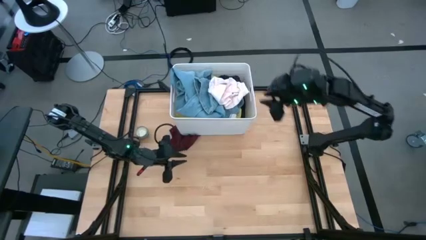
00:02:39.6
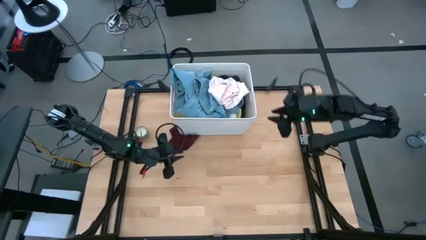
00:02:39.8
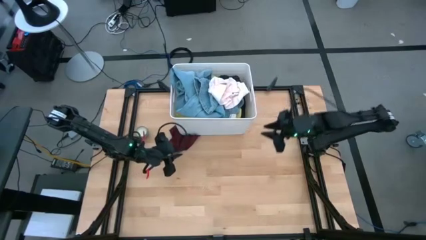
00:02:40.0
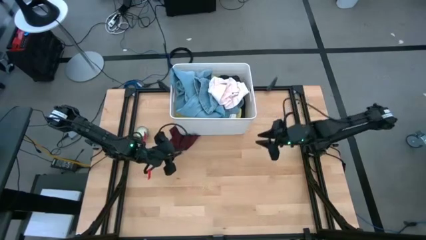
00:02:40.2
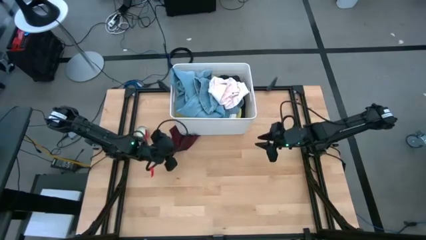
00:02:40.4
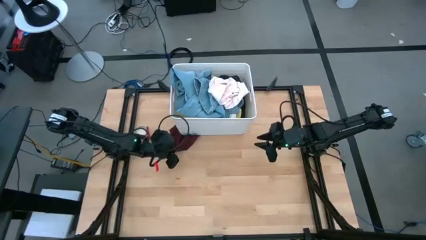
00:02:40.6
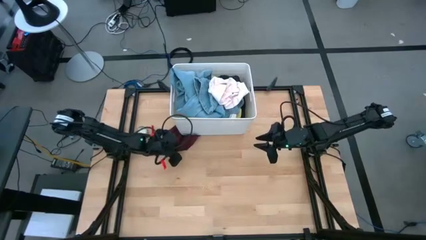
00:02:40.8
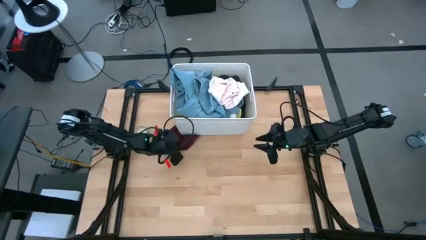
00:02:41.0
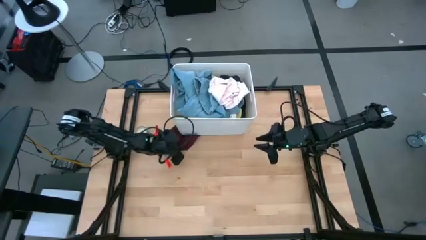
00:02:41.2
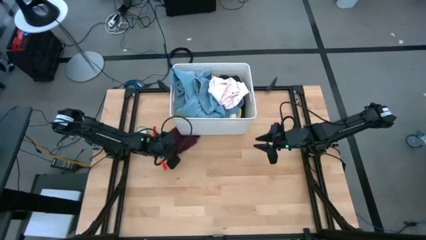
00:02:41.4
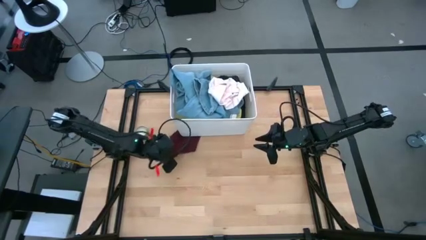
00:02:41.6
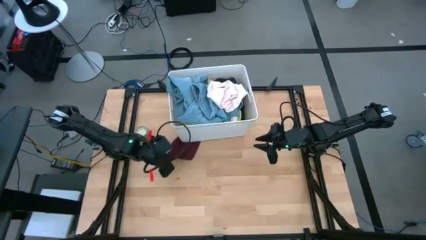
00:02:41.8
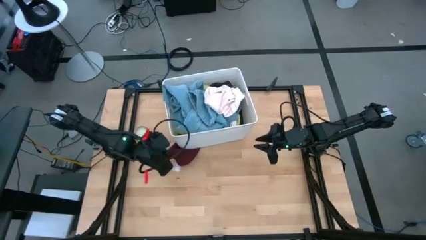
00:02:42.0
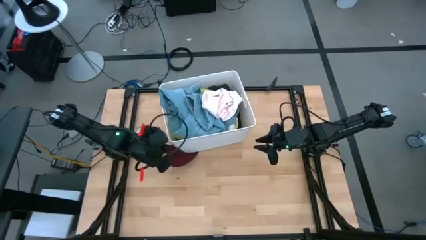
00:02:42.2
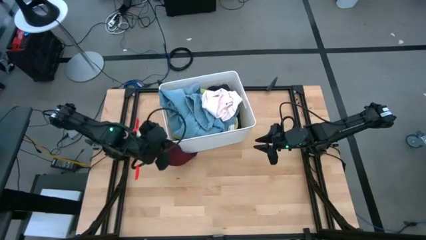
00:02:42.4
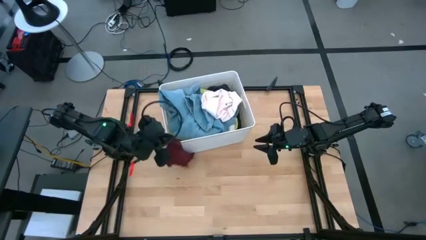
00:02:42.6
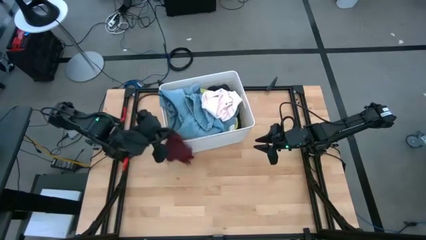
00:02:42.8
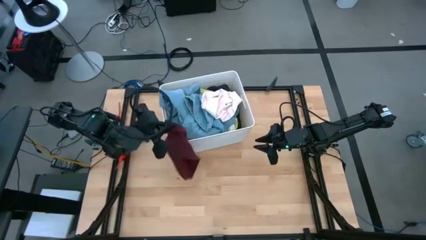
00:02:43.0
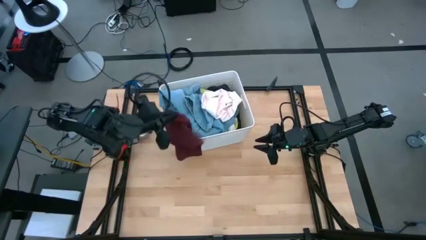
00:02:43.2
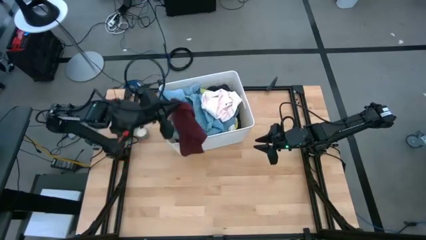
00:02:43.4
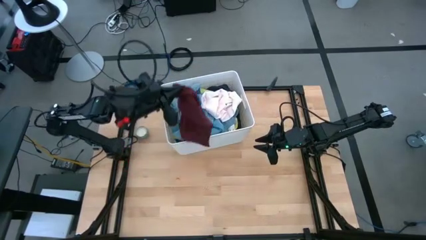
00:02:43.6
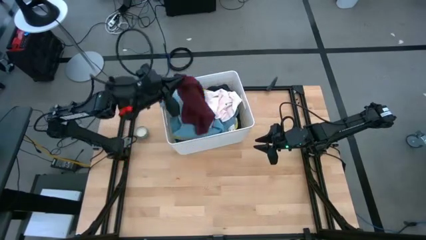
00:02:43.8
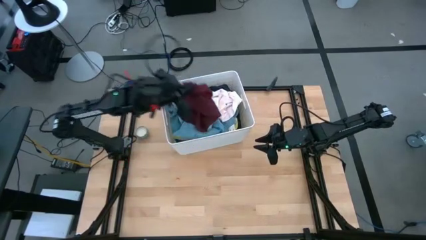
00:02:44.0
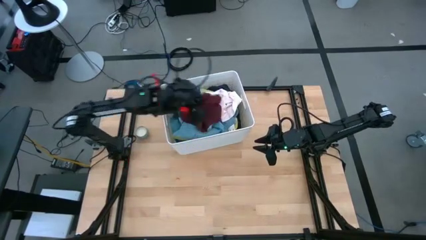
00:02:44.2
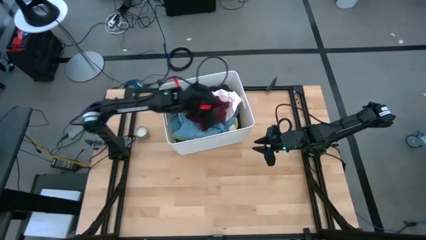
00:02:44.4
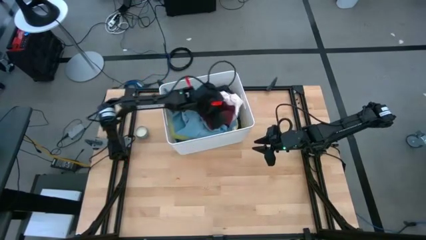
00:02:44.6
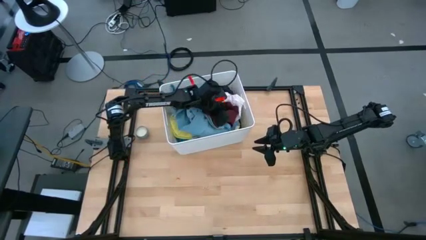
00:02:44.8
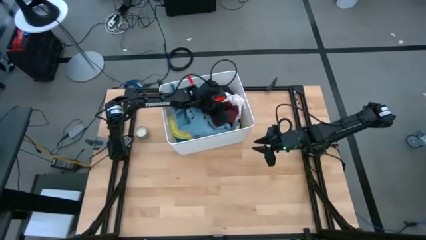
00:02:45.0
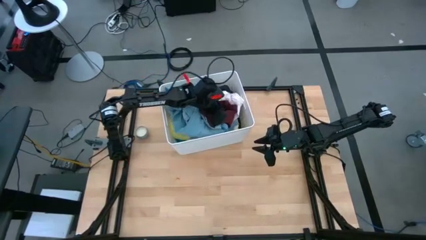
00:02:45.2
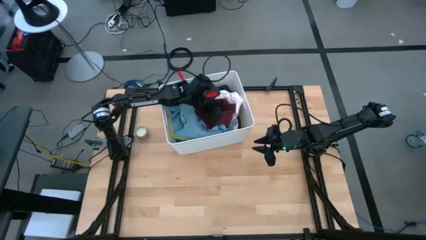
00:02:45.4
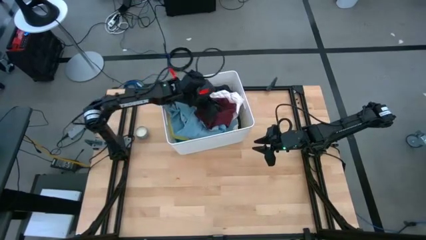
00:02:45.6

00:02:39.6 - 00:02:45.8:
Task: Sort clothes
Put the red underwear into the white laundry bin

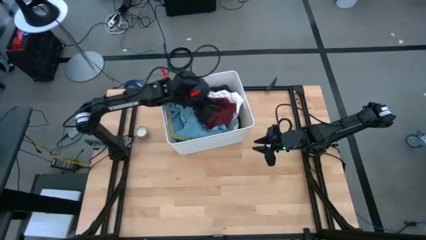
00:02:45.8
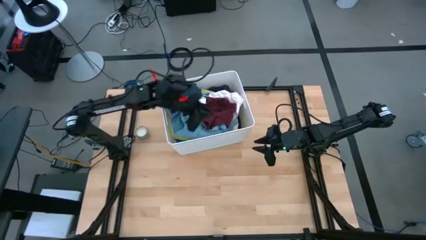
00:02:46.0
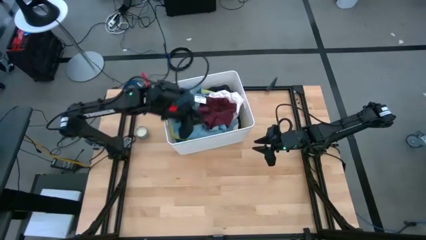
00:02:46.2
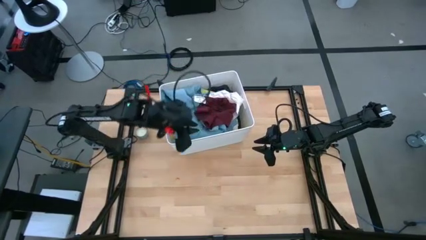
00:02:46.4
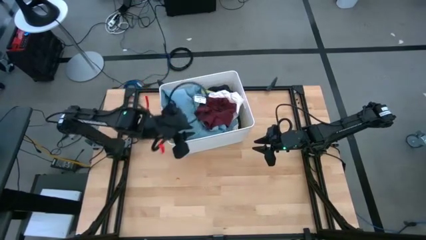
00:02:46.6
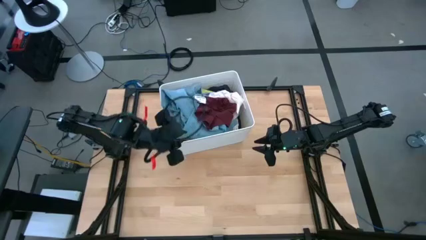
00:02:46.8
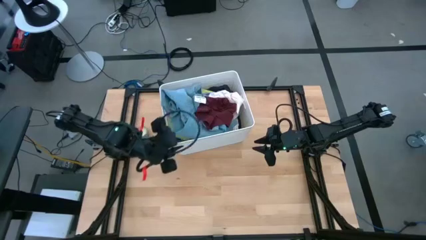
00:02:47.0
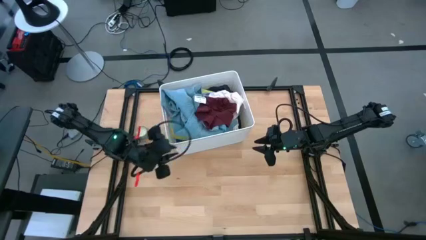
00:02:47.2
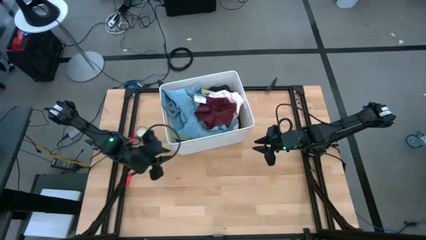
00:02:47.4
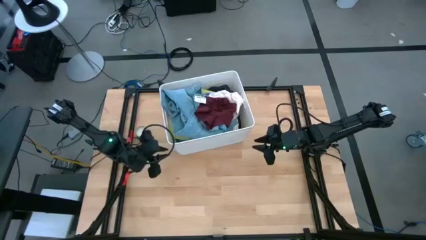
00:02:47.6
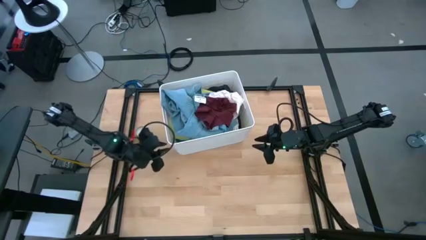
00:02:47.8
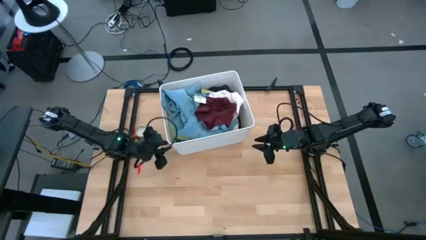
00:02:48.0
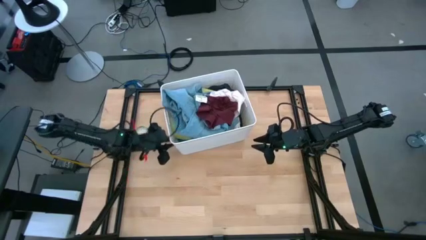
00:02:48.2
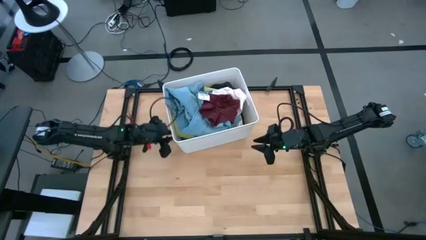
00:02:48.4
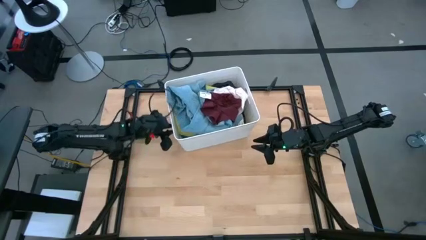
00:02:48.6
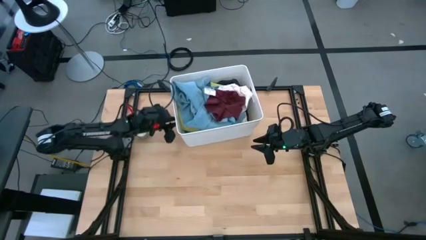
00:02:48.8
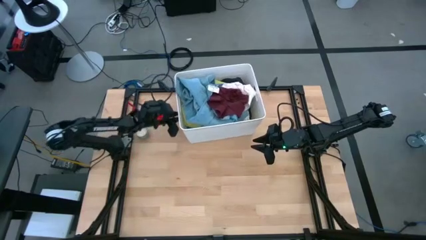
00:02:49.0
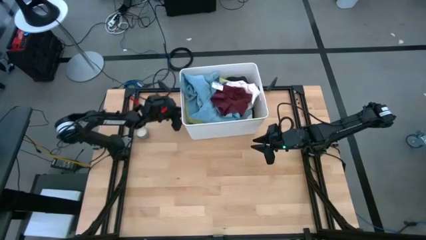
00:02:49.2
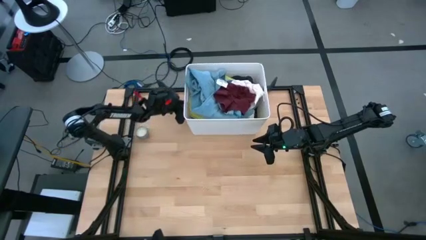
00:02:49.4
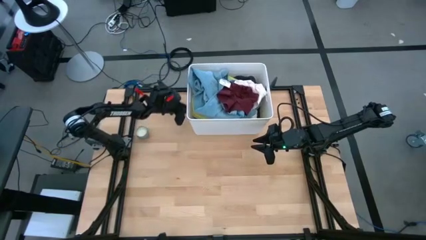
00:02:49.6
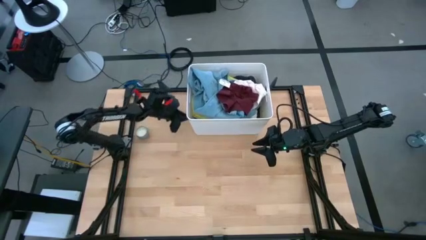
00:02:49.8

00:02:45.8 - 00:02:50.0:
Adjust the white laundry bin

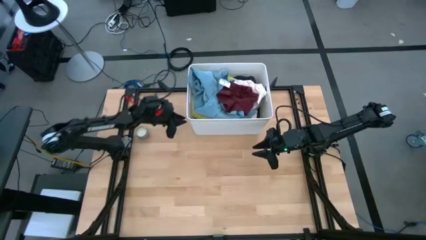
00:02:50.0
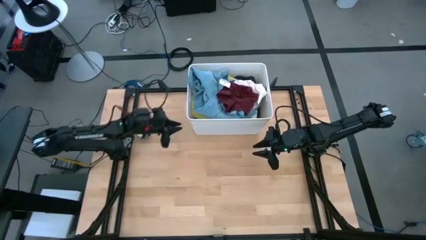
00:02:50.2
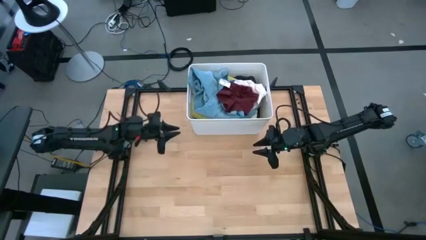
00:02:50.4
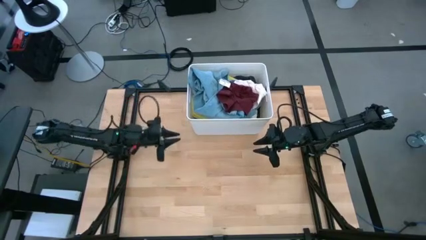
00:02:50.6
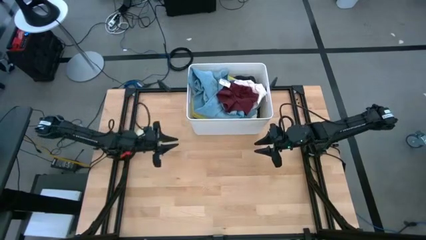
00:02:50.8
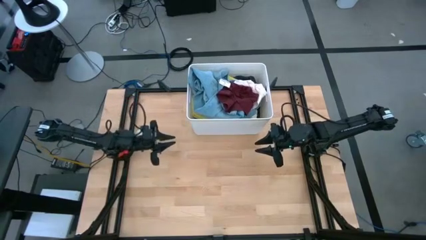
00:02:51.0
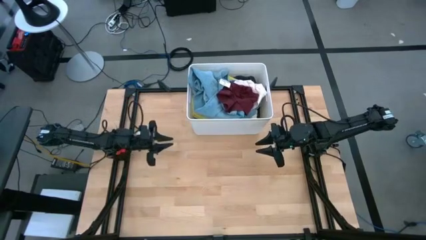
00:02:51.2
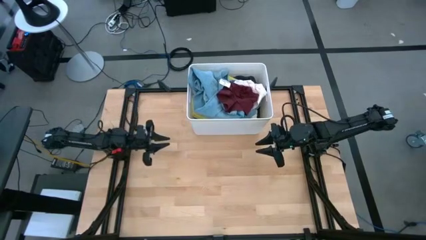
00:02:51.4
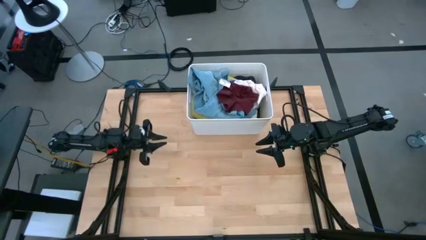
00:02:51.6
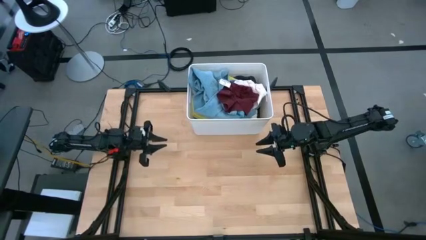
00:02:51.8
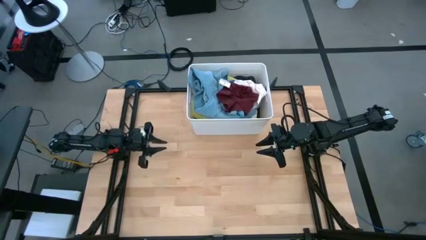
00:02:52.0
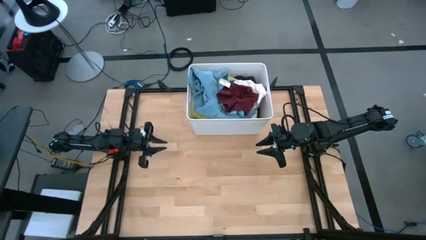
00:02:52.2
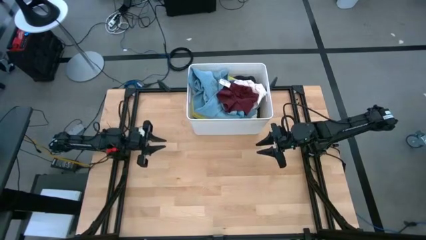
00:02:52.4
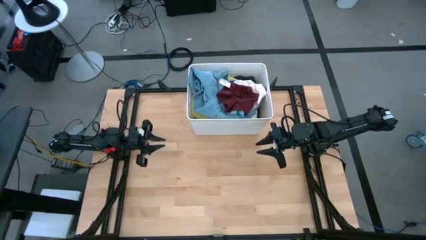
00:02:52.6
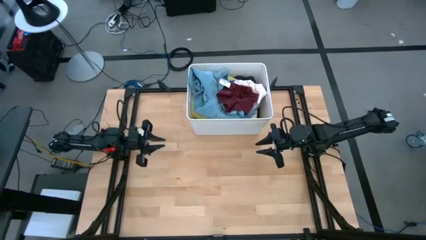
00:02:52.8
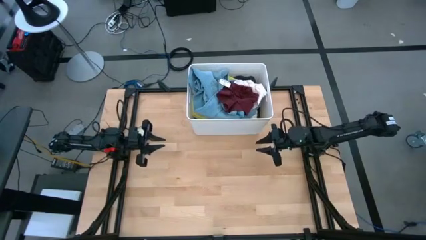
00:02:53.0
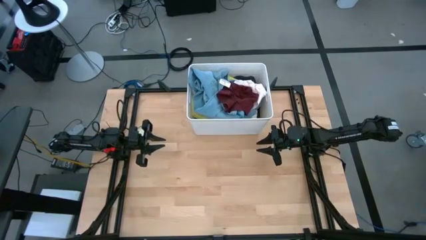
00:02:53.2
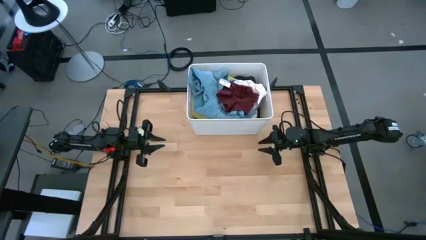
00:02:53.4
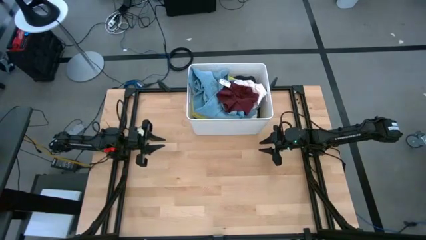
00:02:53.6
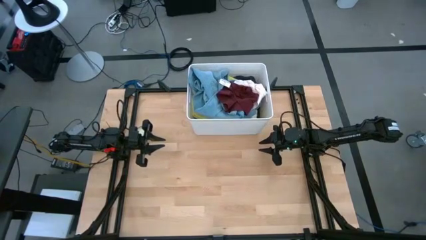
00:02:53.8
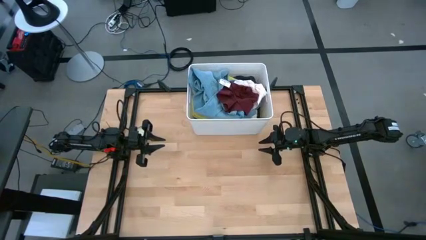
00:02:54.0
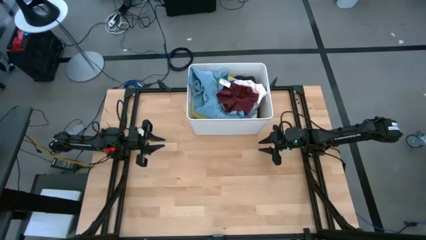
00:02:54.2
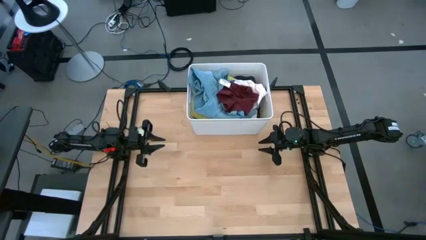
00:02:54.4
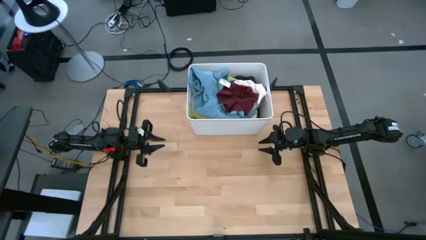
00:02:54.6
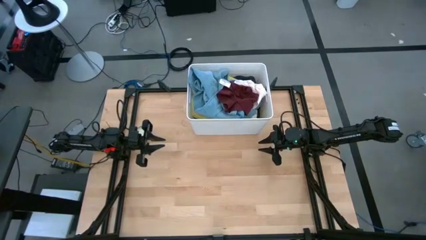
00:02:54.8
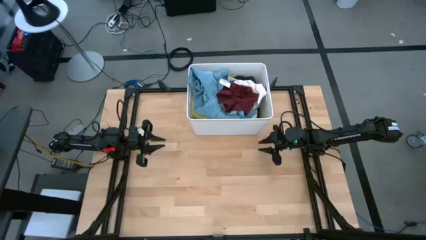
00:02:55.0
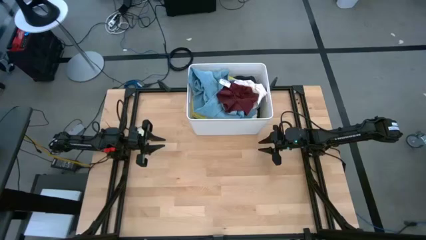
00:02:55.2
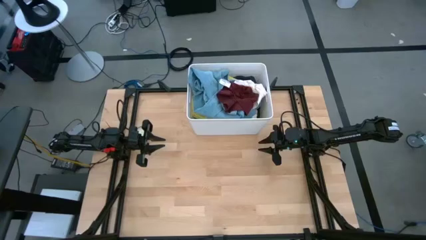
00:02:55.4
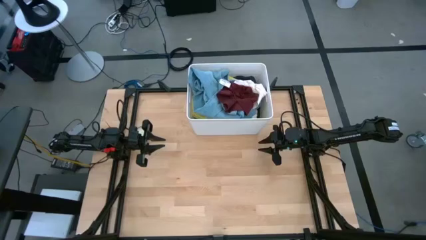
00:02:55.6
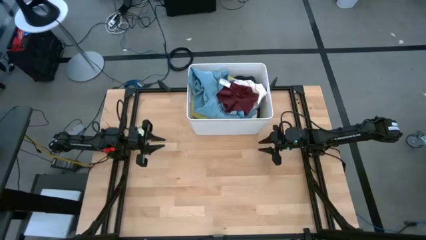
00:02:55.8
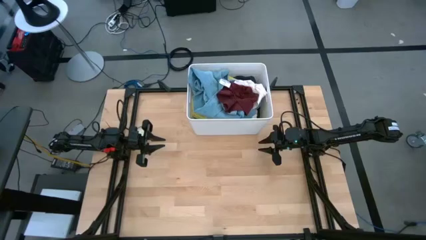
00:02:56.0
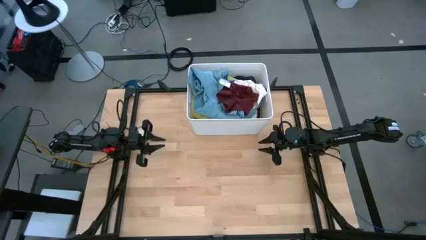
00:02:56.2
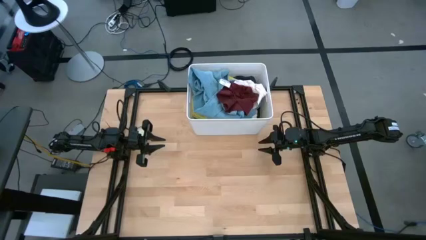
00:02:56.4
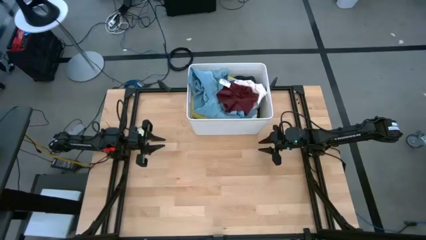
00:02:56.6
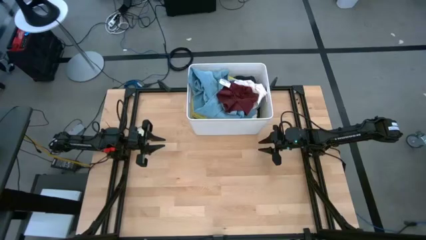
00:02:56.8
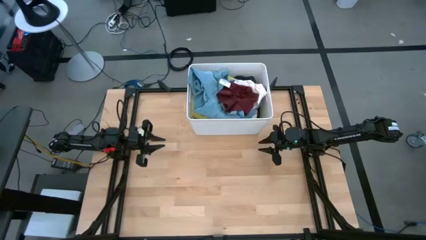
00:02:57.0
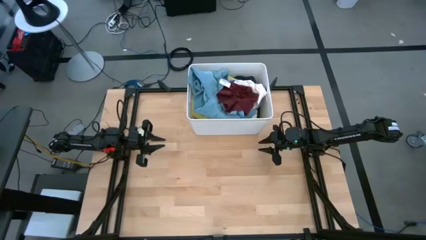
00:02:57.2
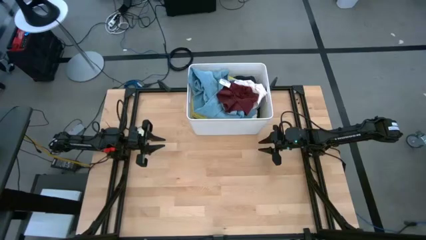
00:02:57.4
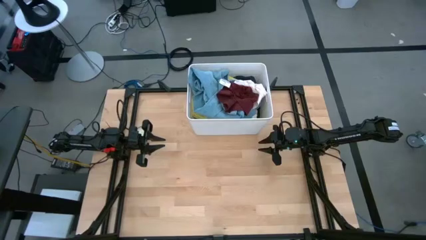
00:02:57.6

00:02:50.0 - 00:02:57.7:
Return to home position
